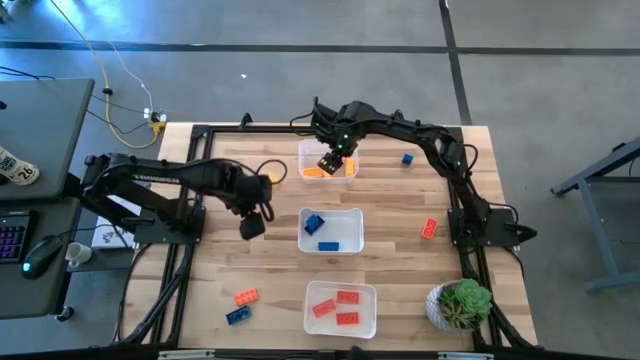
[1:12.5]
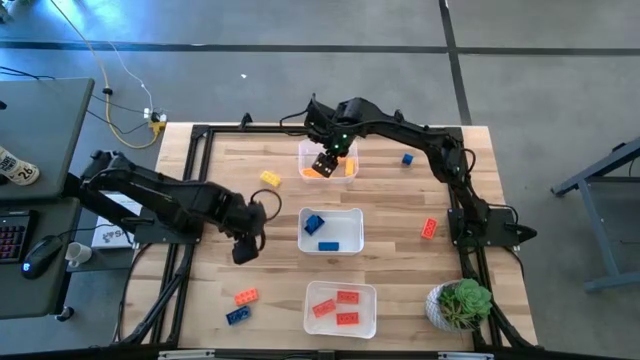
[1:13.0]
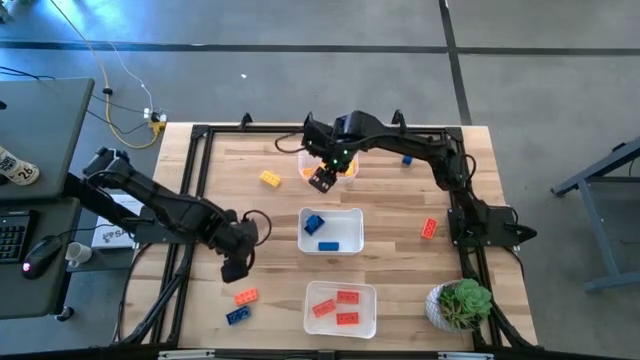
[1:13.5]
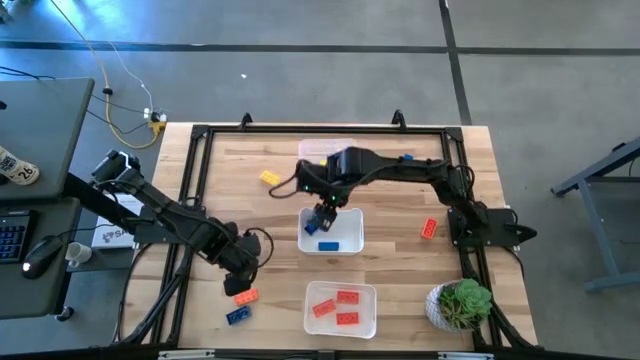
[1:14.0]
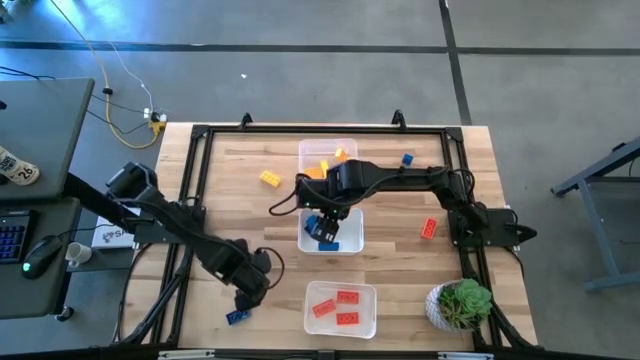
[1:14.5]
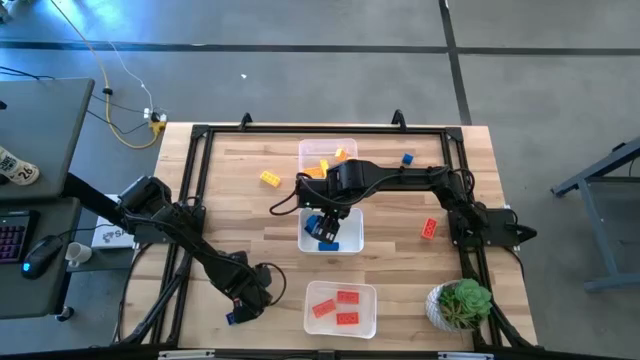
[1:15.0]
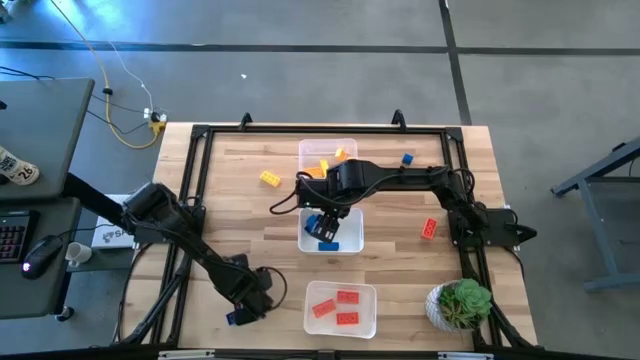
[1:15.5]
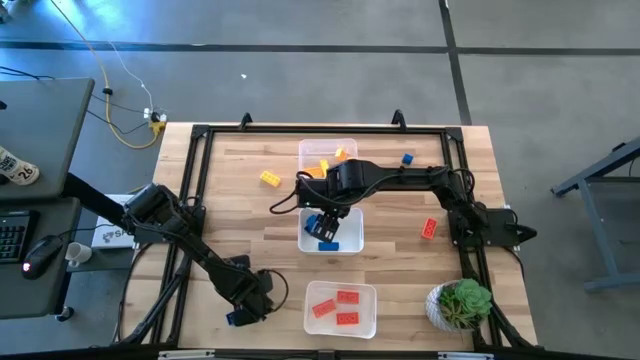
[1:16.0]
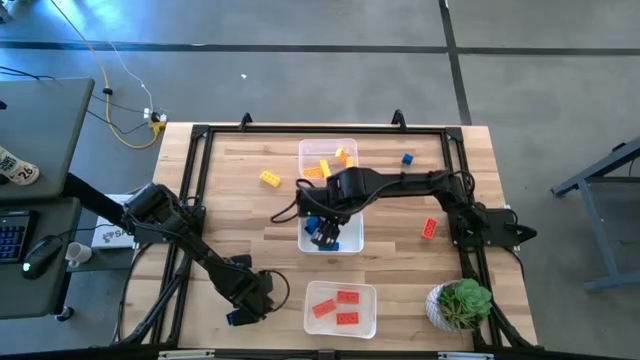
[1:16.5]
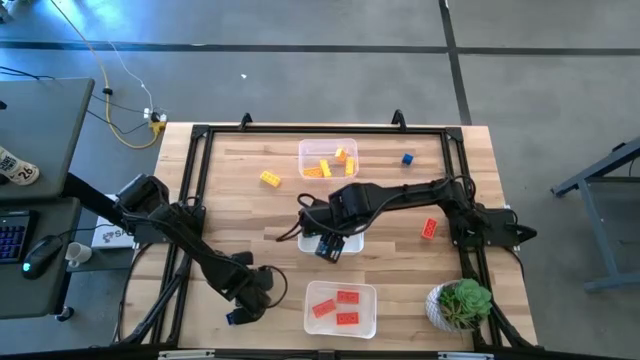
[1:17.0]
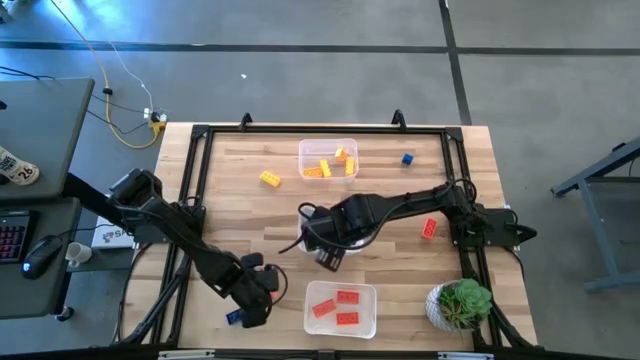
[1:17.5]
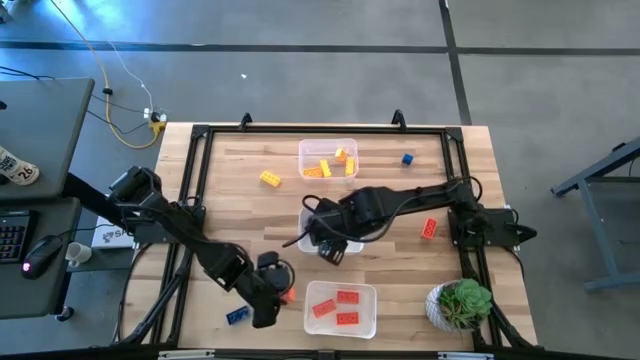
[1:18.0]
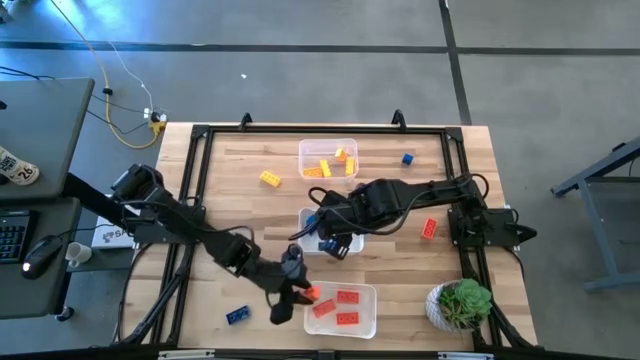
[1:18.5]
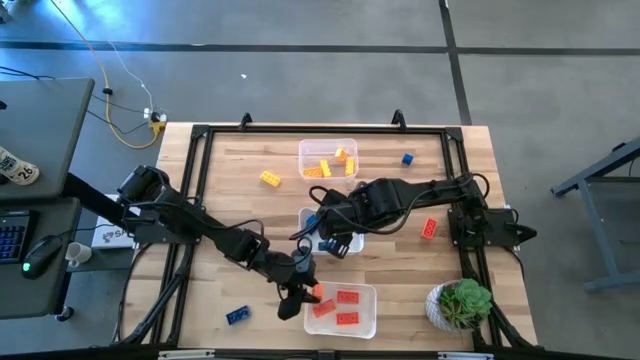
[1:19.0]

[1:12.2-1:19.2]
Task: Sort & place blocks by color
Put the orange game piece into the bottom white bin

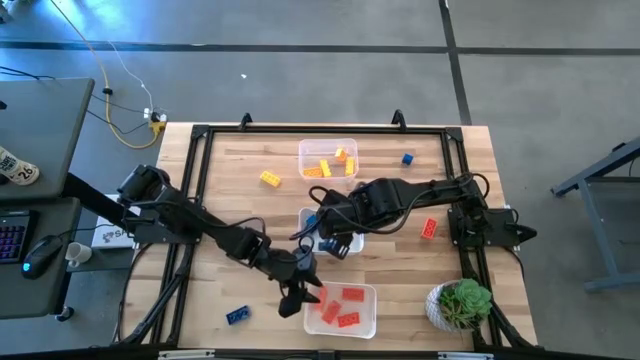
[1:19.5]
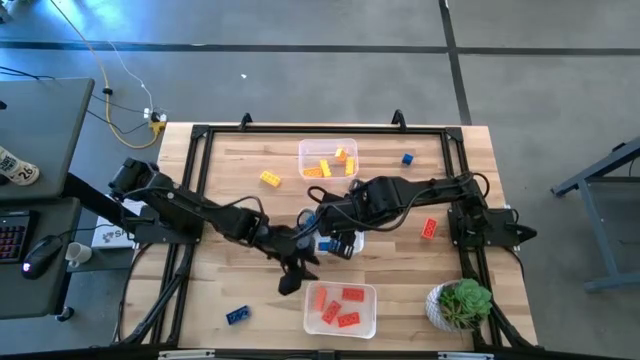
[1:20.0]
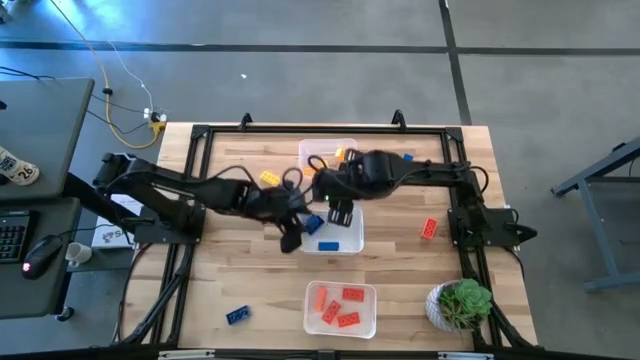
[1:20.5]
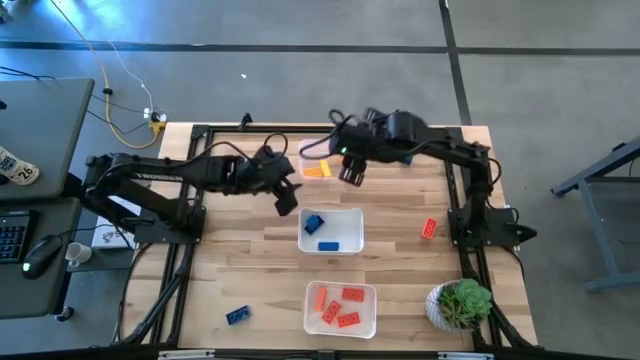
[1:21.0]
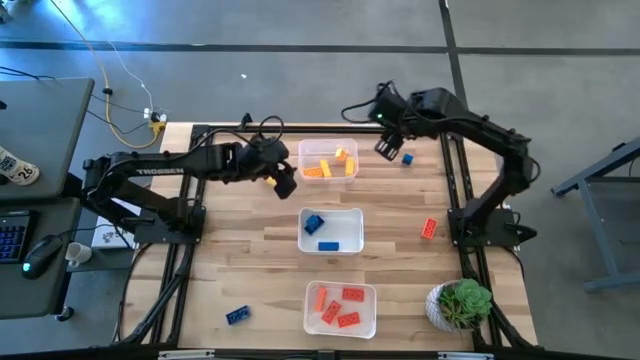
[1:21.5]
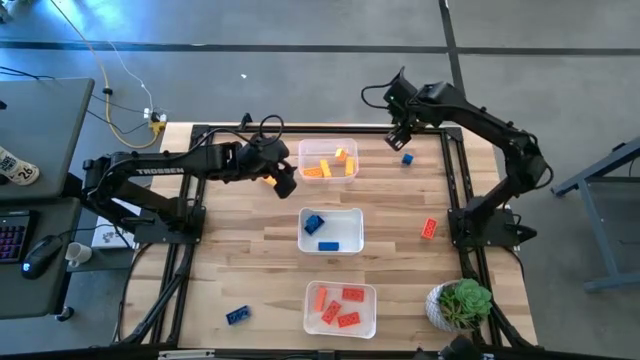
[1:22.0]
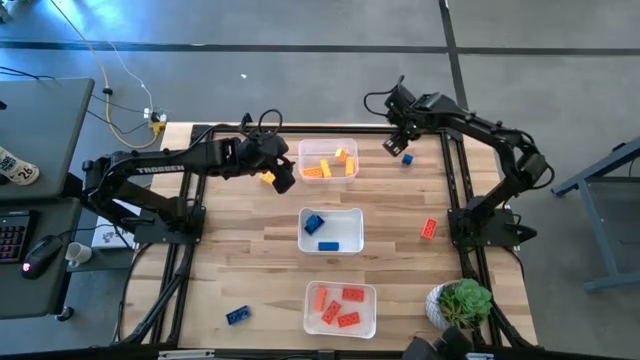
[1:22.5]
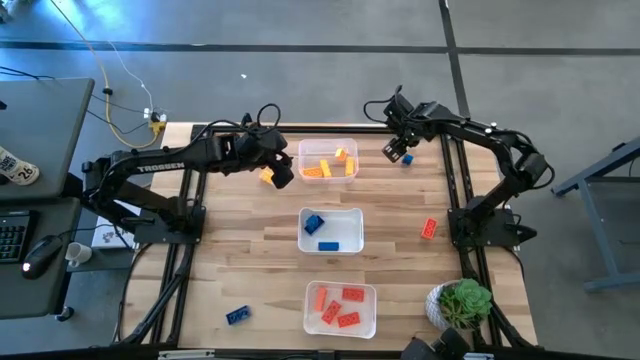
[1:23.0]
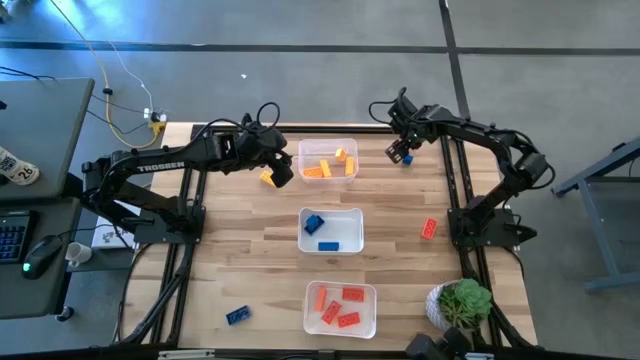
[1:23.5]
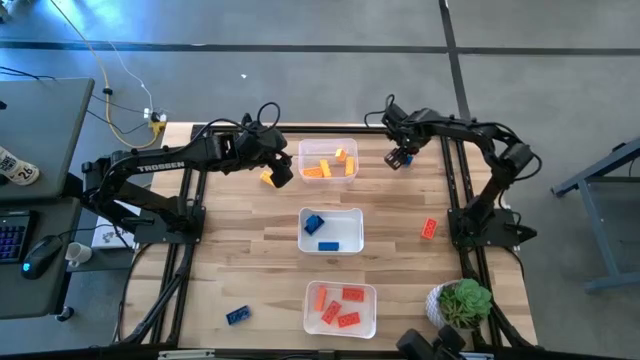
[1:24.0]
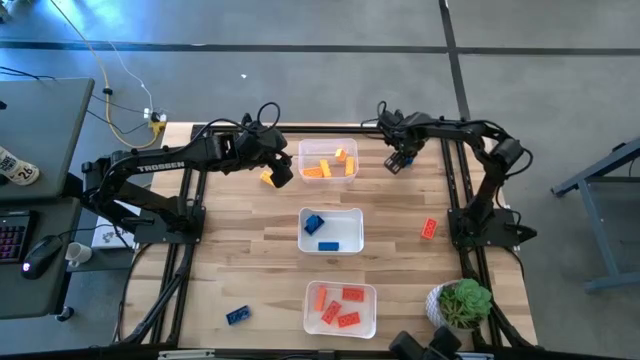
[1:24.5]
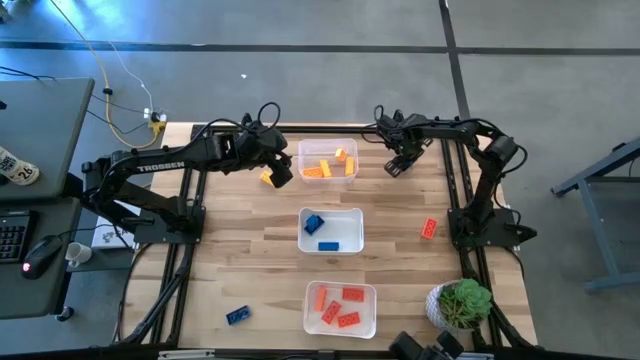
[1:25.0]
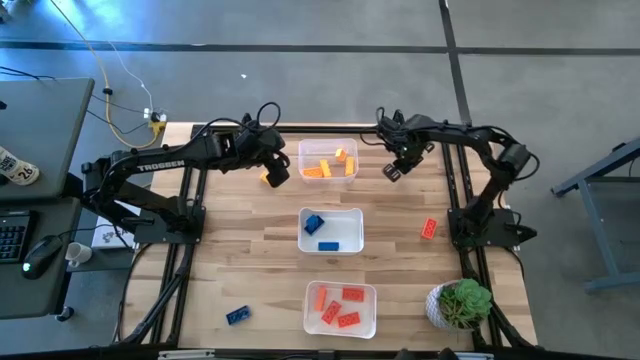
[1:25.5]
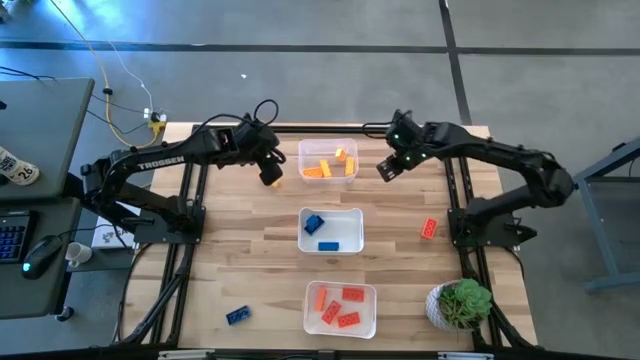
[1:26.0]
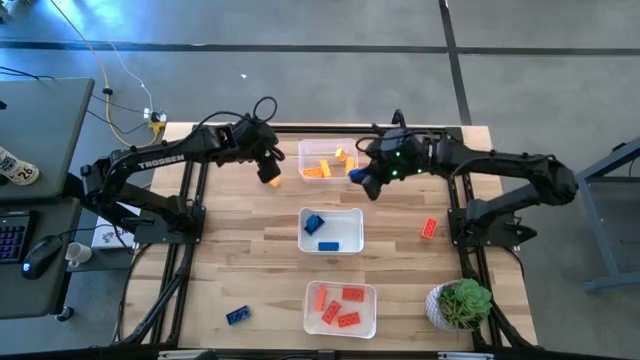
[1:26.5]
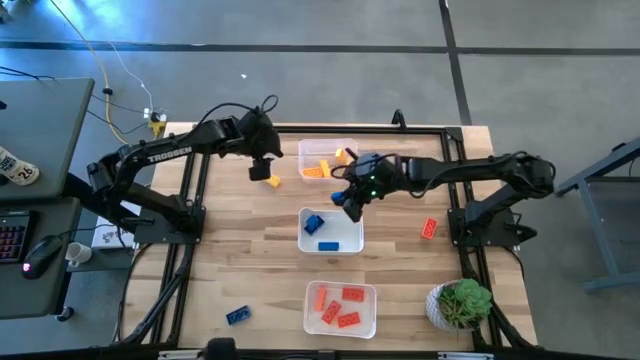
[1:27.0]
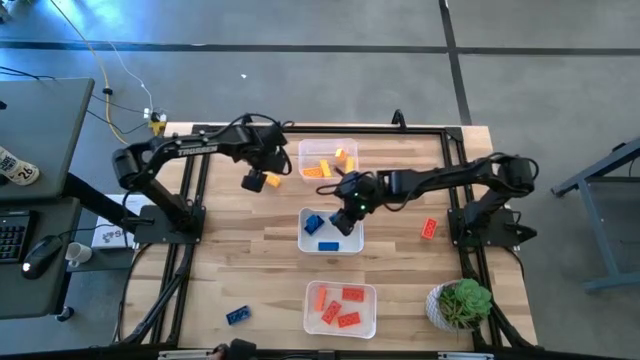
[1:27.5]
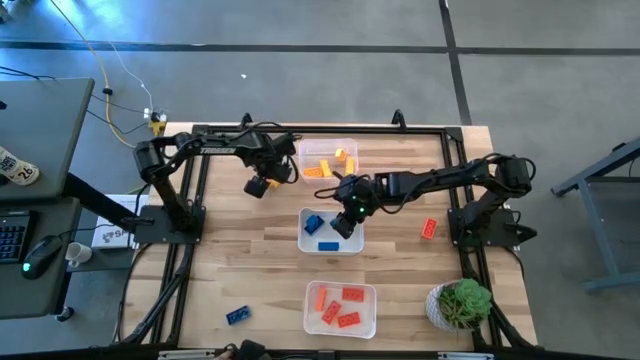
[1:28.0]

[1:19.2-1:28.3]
Put the blue game piece into the top white bin

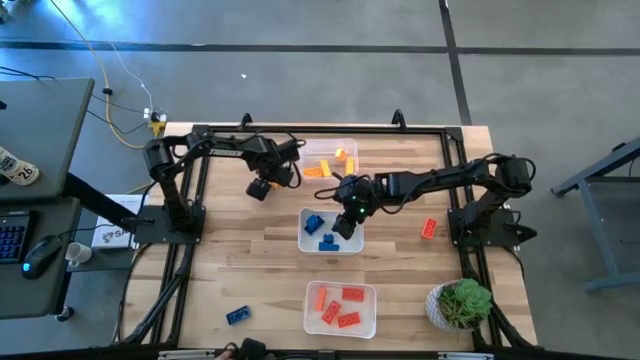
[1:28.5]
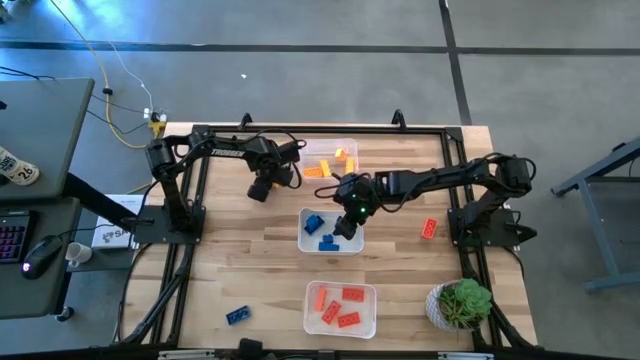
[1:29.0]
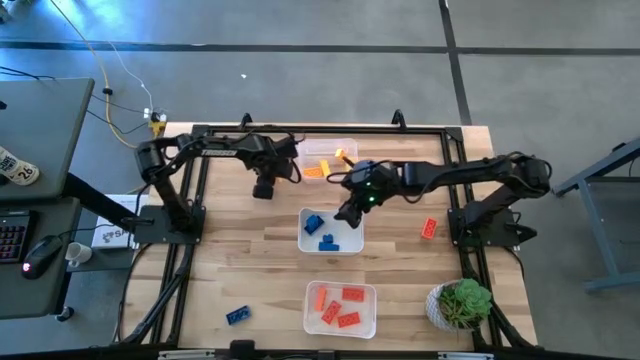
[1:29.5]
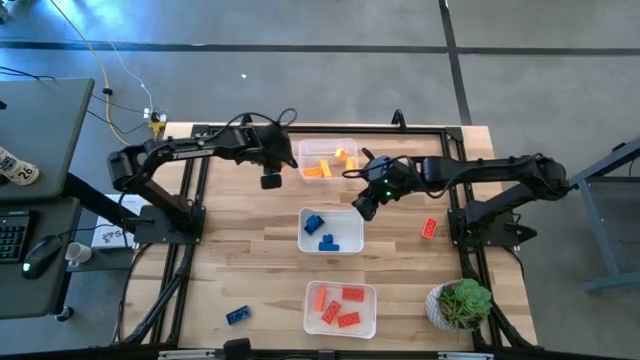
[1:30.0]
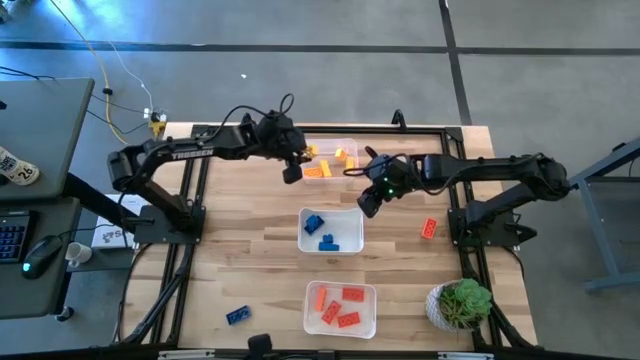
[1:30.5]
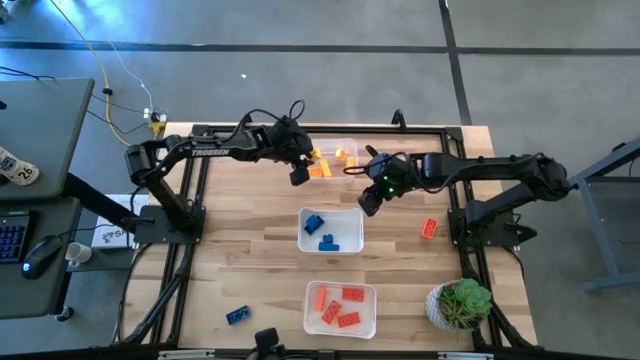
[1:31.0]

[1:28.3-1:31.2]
Put the yellow game piece into the transparent bin

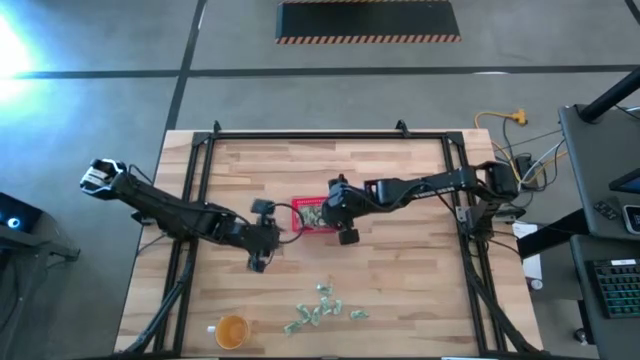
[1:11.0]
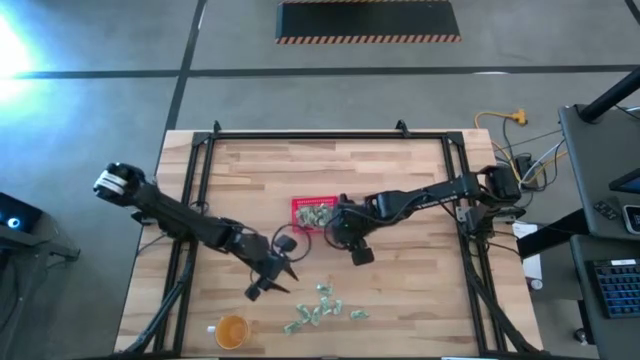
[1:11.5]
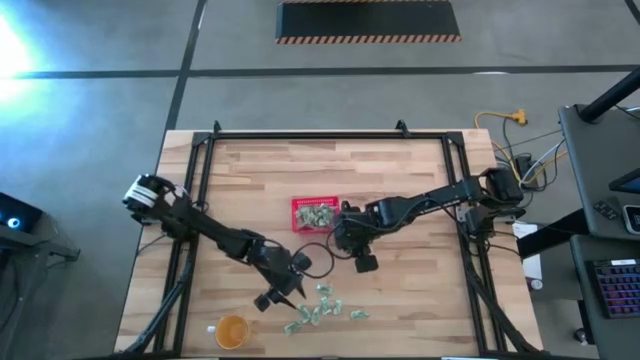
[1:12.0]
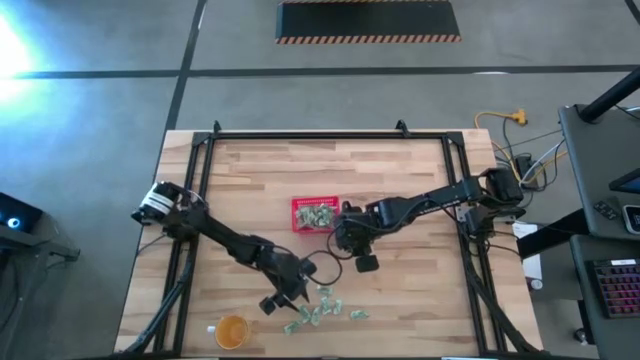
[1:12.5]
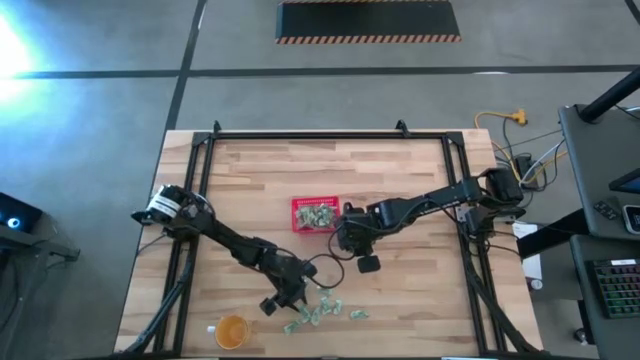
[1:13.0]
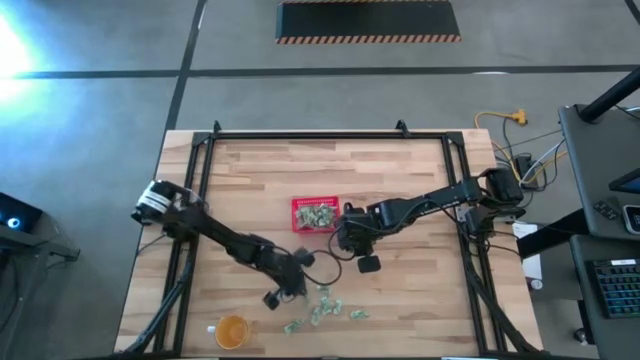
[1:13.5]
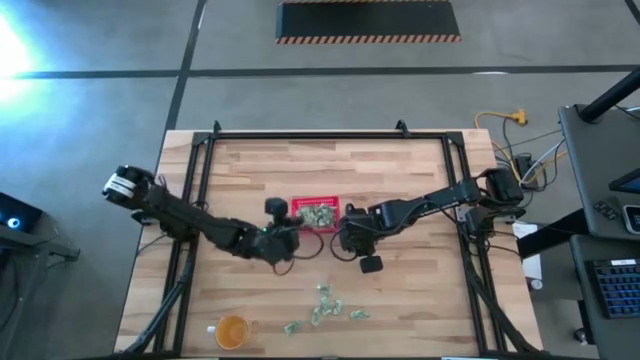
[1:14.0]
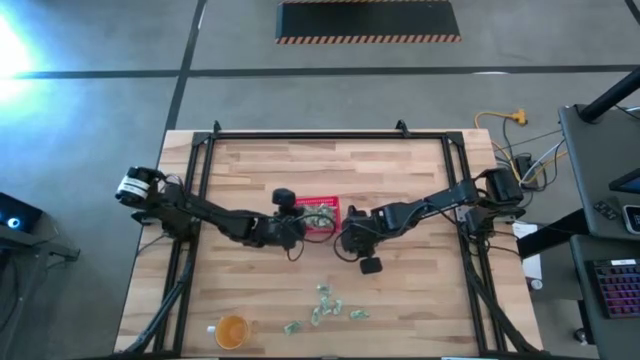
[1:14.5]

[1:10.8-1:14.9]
Task: Pick and place items into bin
Put the stevia packet into the red bin
